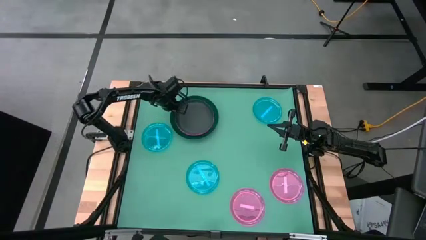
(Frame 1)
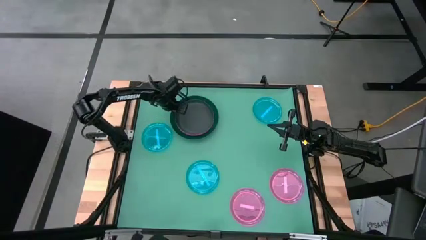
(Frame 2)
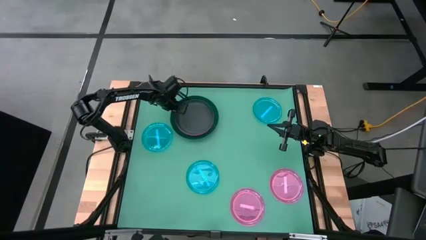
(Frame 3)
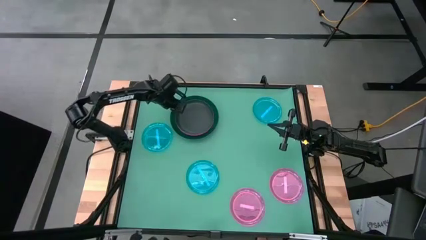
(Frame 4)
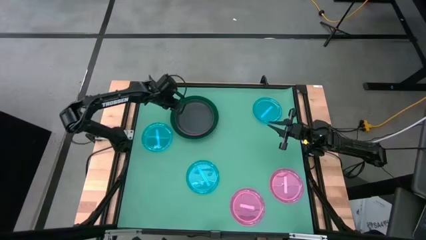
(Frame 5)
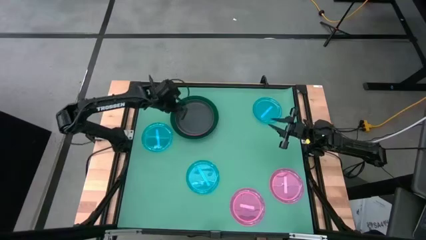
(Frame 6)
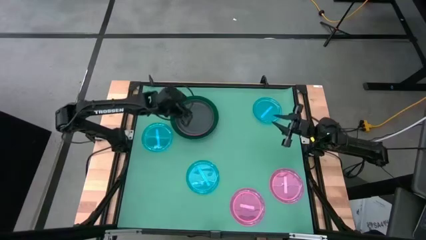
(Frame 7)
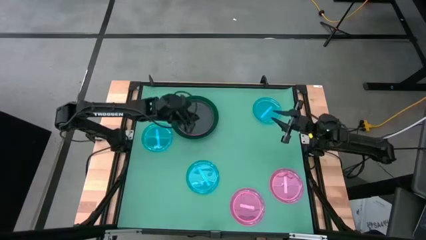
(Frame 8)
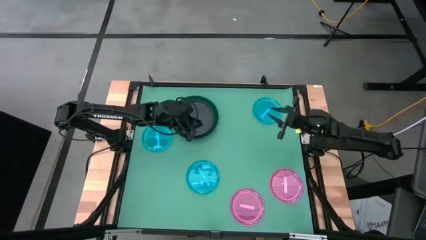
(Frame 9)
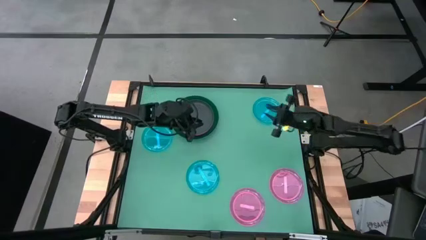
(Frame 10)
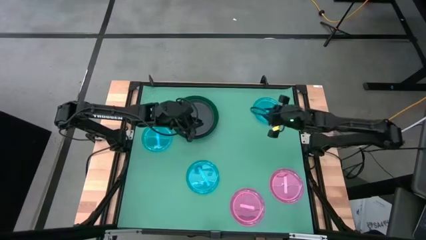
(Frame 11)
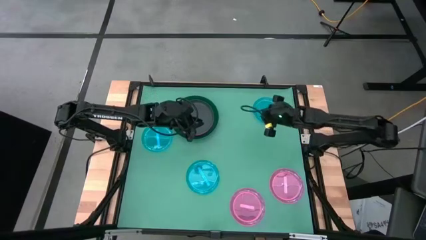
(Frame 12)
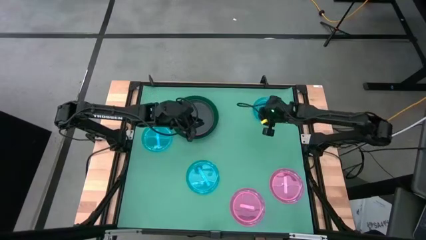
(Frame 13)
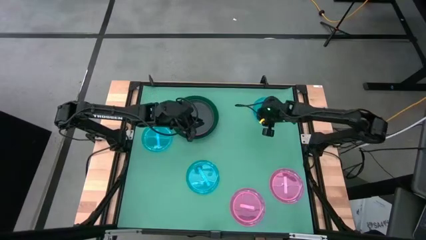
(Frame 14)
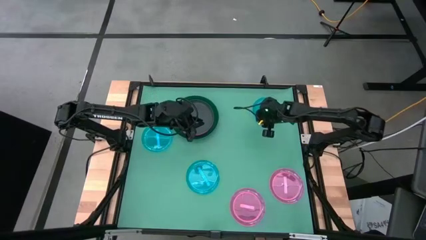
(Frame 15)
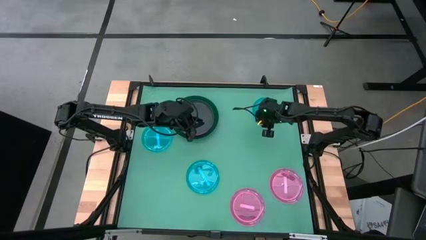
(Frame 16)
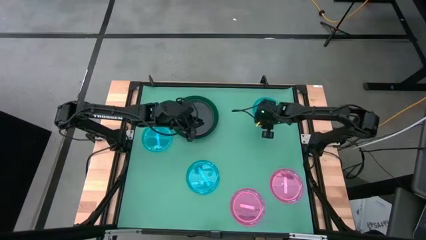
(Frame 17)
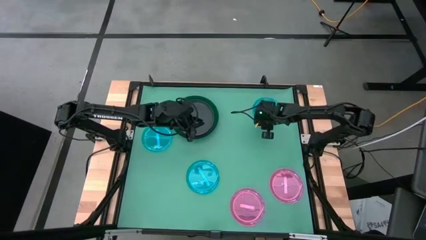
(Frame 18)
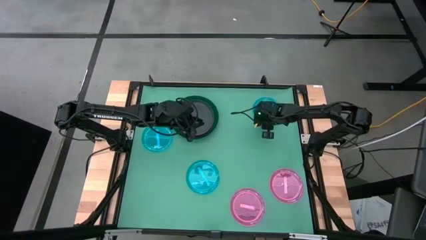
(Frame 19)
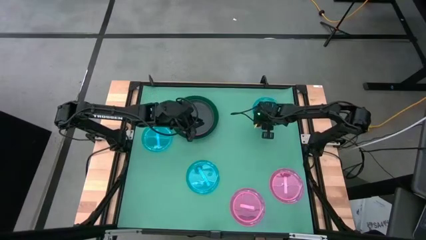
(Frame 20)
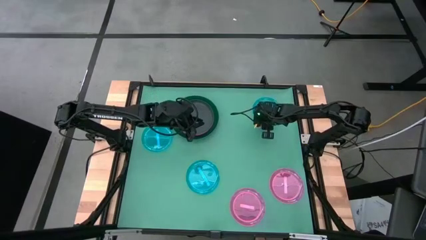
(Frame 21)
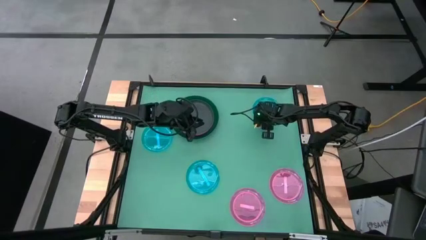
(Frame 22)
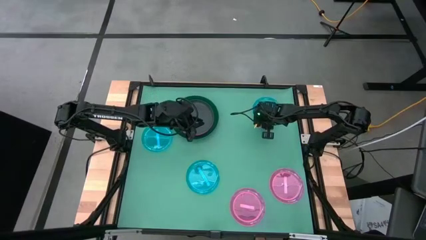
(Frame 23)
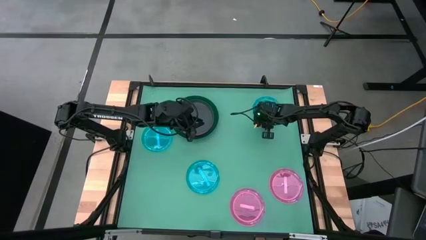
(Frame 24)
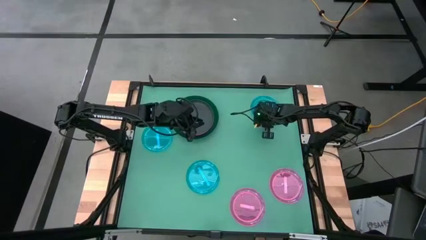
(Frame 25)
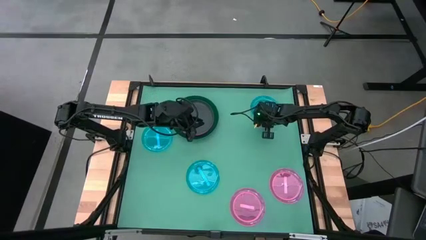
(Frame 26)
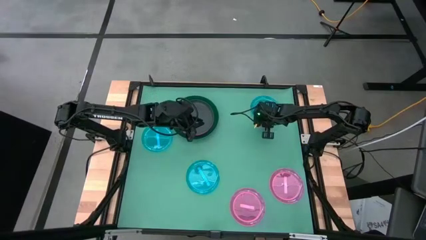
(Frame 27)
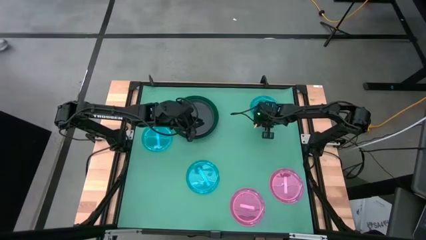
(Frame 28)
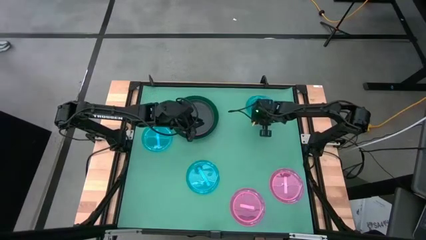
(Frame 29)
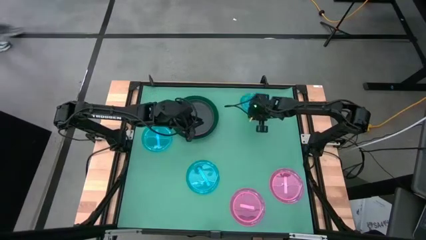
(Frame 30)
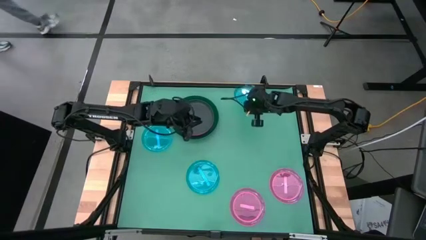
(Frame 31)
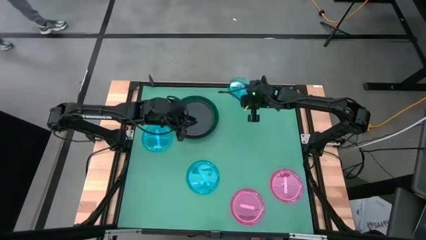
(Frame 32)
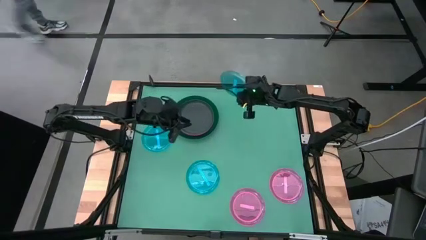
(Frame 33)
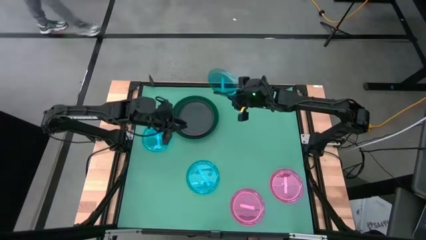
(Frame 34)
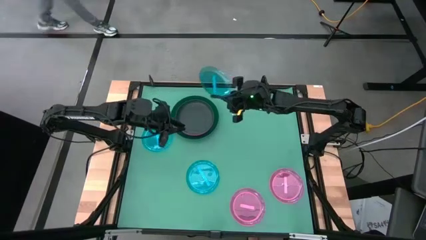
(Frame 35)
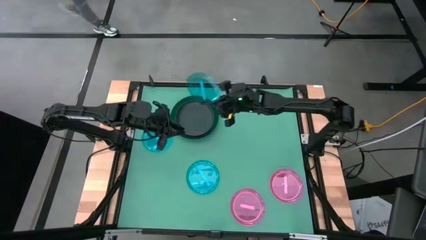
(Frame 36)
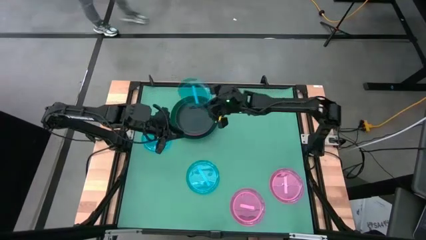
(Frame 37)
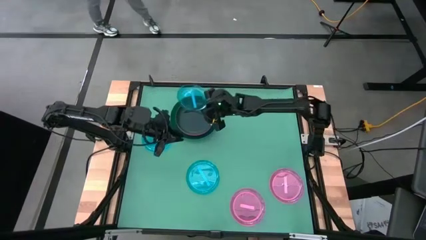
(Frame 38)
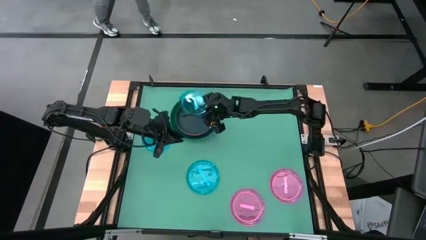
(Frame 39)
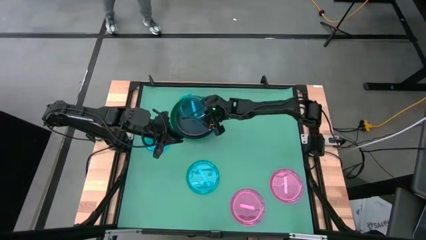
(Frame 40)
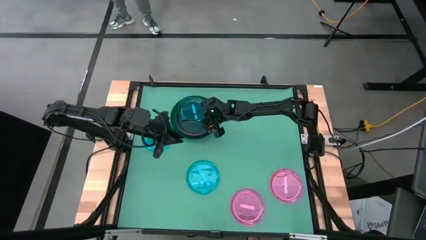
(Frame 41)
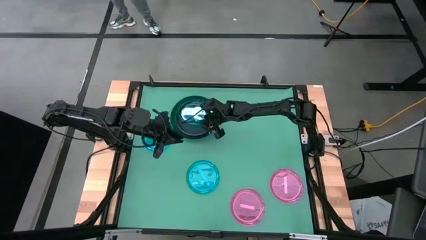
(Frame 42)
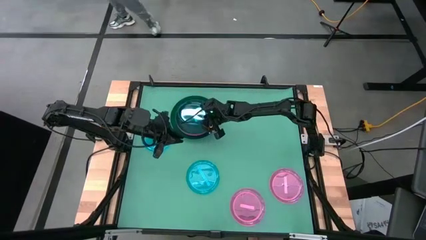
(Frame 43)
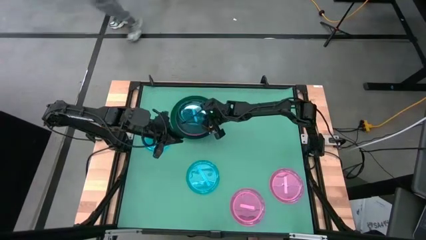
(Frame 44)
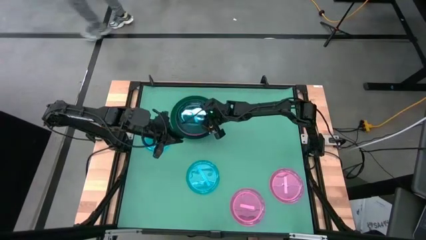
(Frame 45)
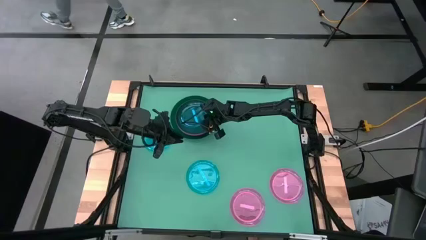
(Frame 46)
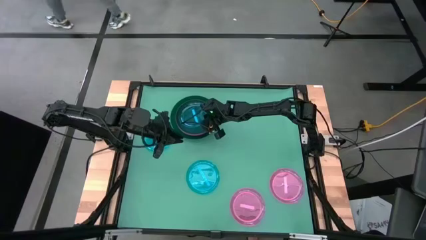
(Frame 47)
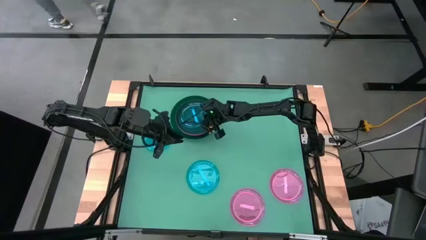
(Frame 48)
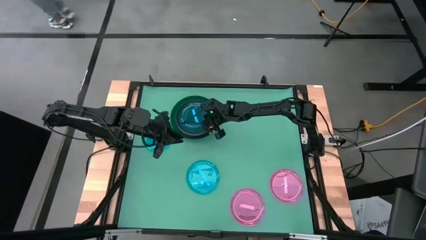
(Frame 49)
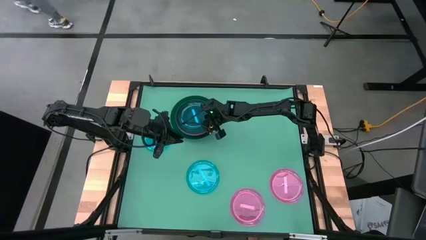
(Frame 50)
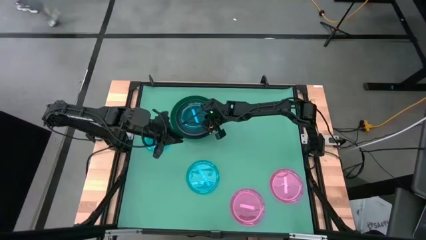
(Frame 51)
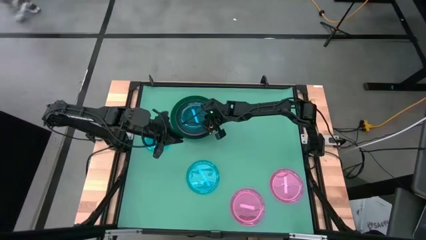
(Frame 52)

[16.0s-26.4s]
Task: Stack plastic plates
Stack the top right blue plate on top of the black plate
